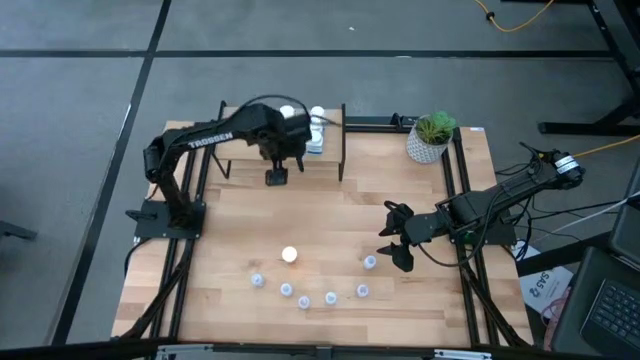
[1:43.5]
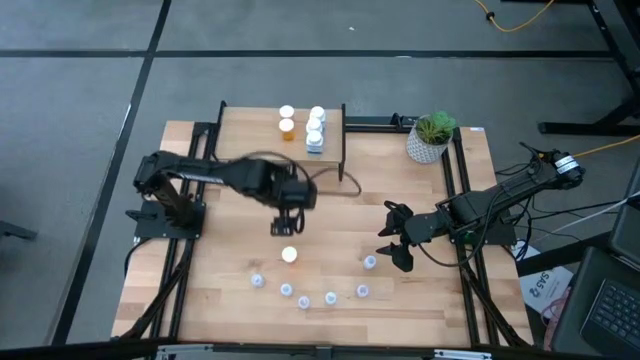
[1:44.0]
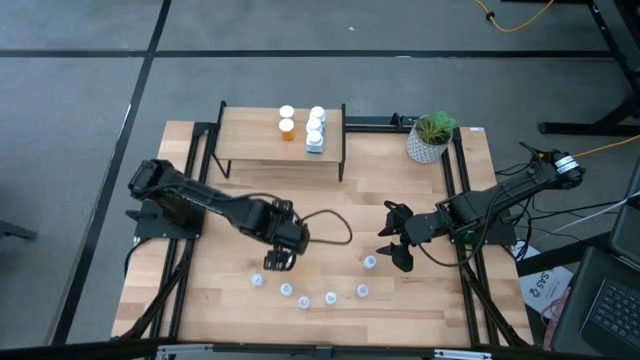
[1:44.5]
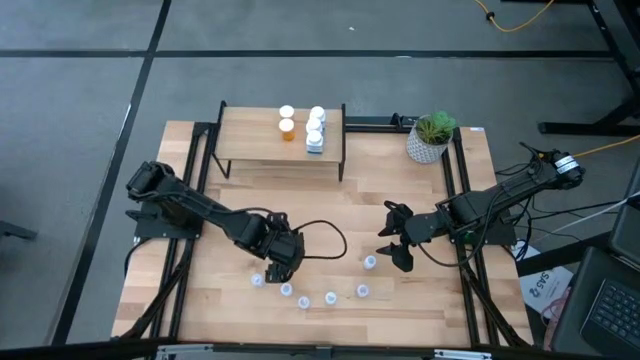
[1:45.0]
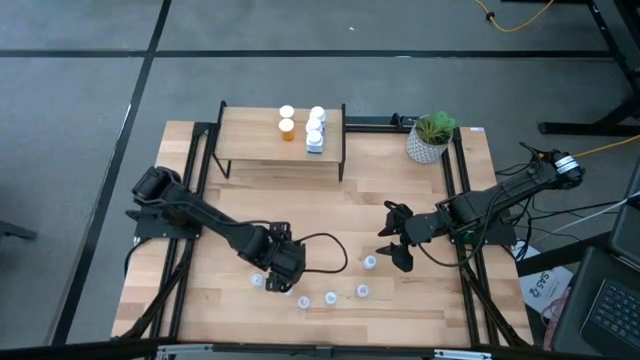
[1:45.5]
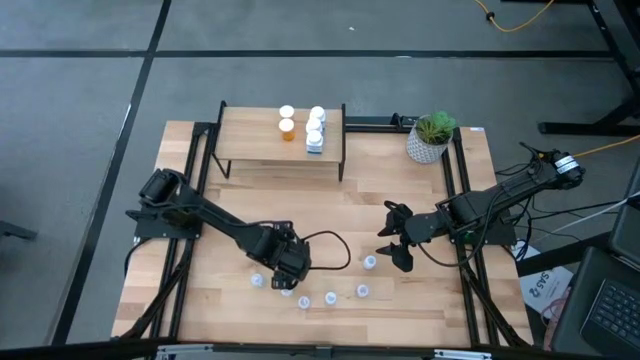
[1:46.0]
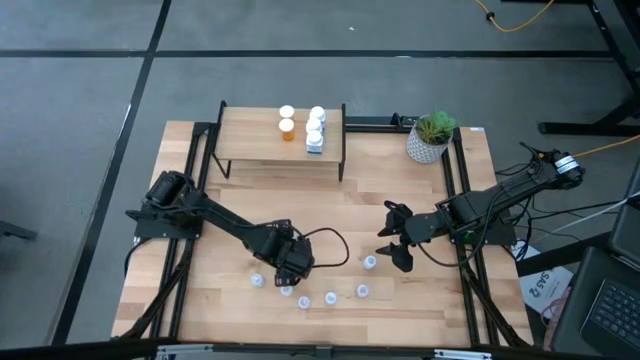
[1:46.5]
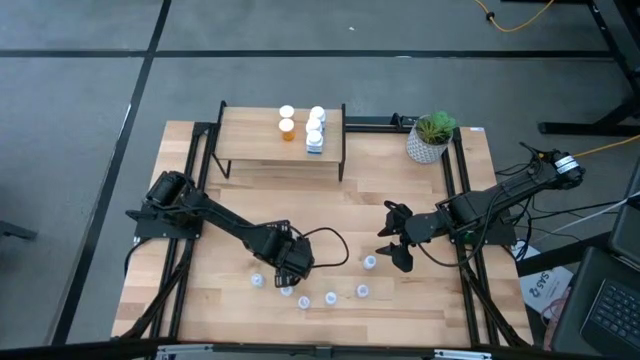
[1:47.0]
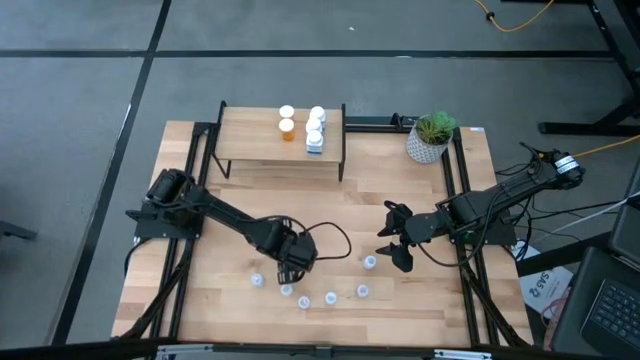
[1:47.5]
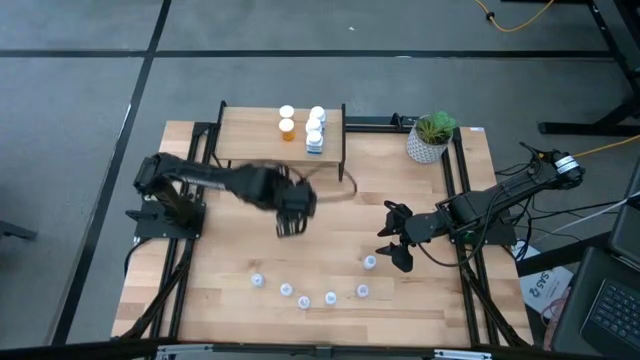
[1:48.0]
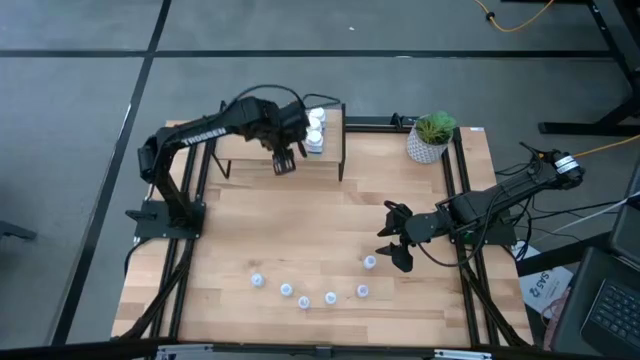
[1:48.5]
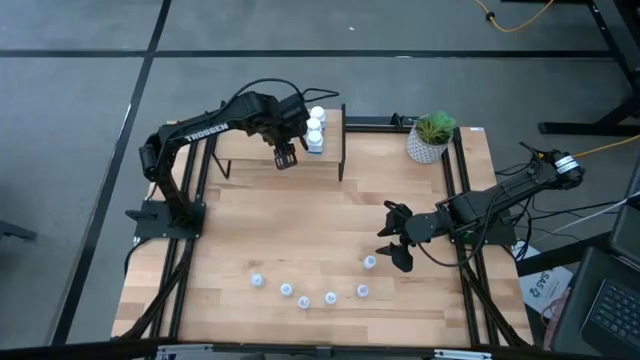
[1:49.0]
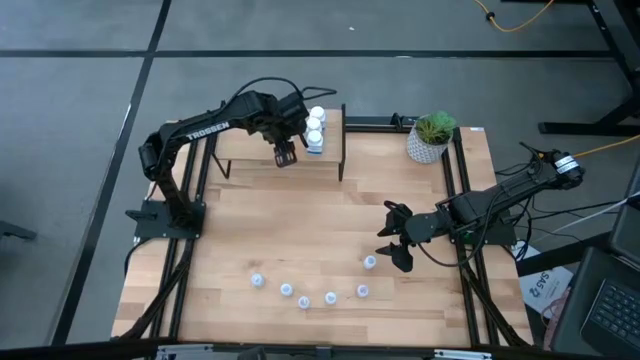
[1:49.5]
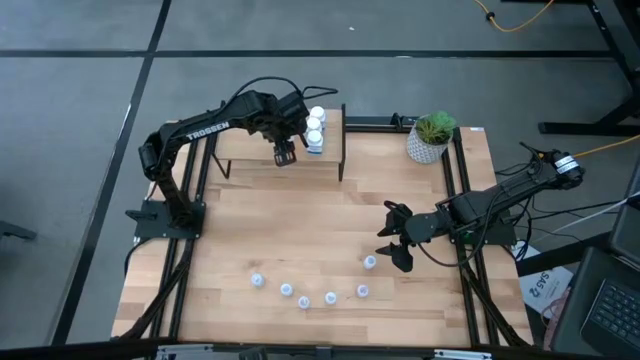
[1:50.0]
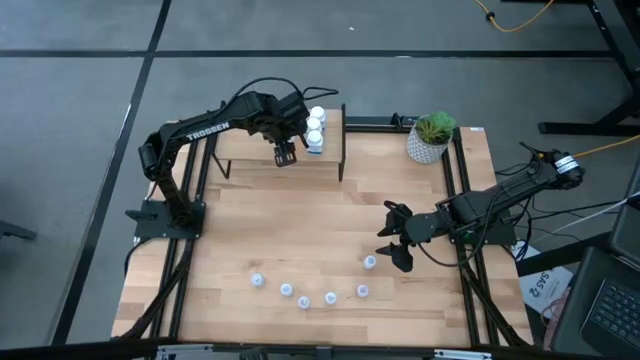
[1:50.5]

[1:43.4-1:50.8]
Task: Pick and place medicine bottles onto shelf by color
Put the orange pill bottle on the shelf aligned with the orange pill bottles

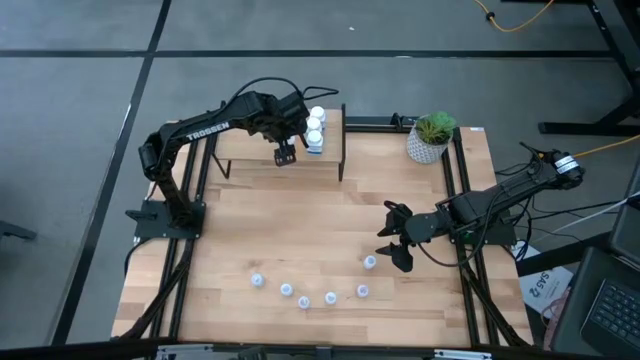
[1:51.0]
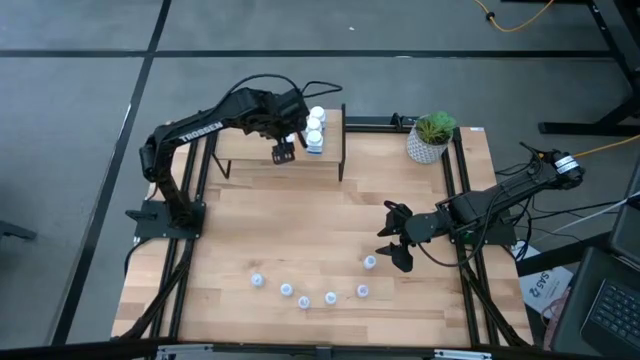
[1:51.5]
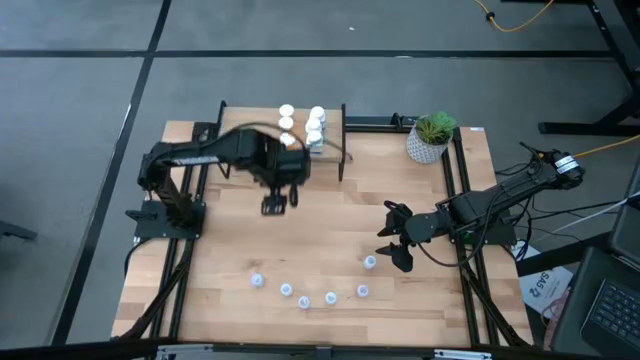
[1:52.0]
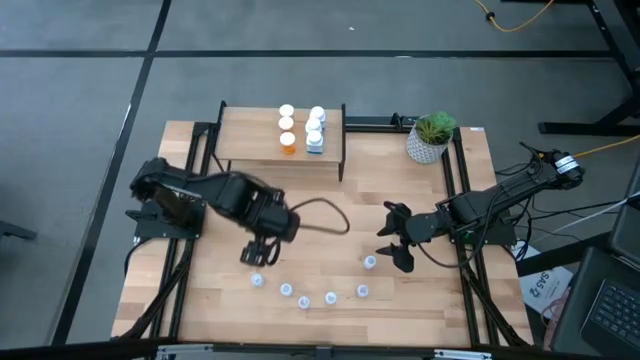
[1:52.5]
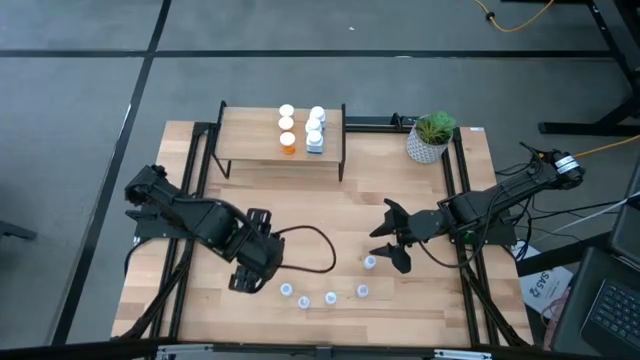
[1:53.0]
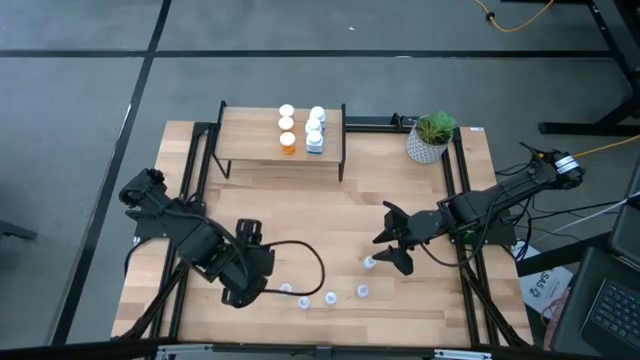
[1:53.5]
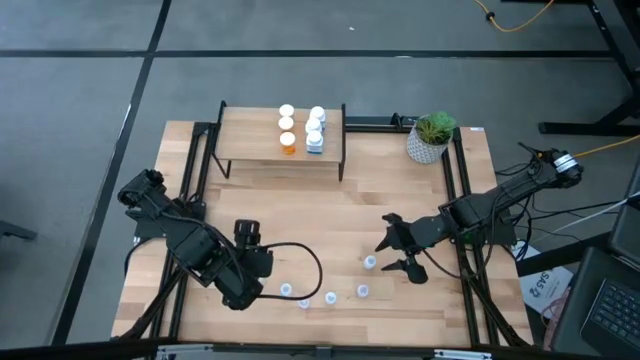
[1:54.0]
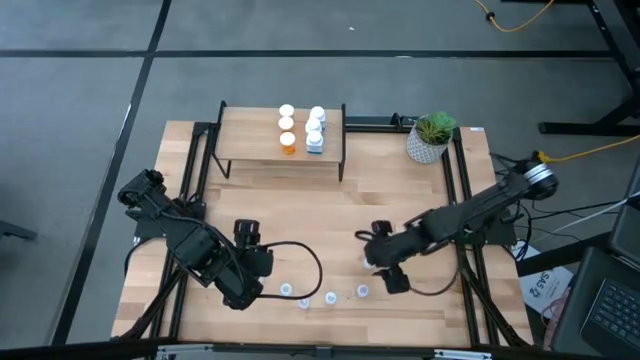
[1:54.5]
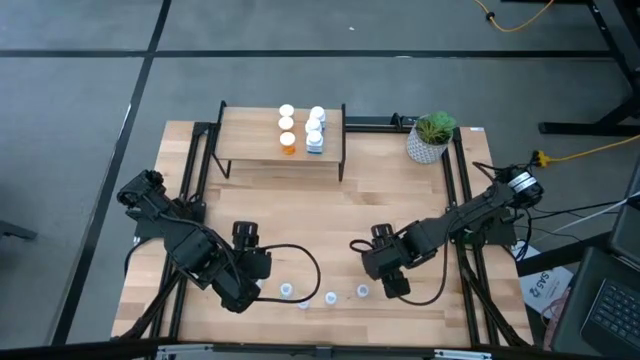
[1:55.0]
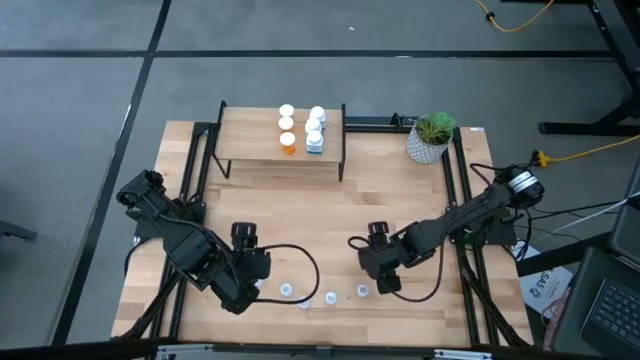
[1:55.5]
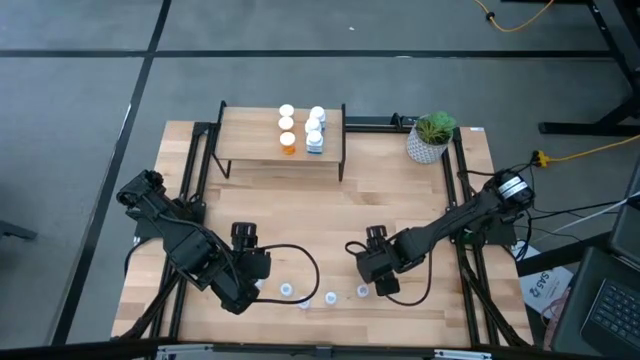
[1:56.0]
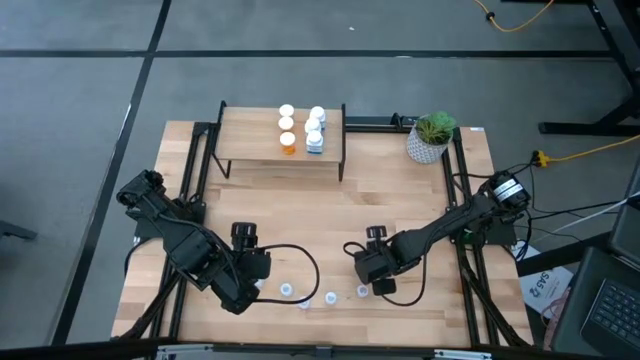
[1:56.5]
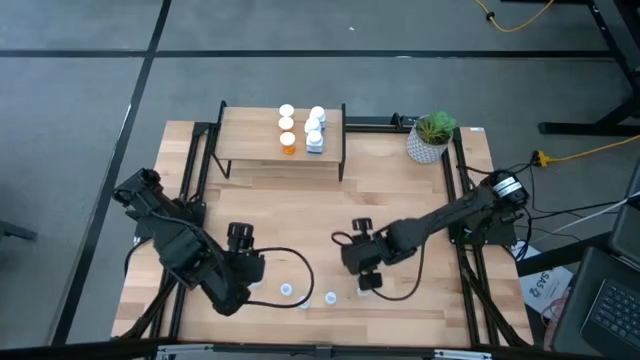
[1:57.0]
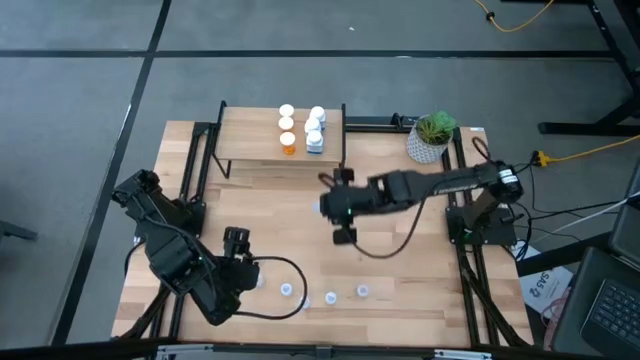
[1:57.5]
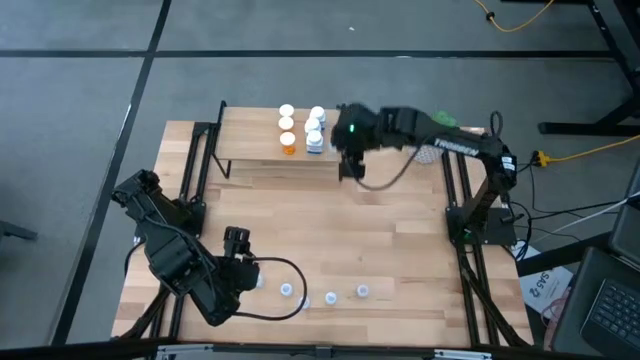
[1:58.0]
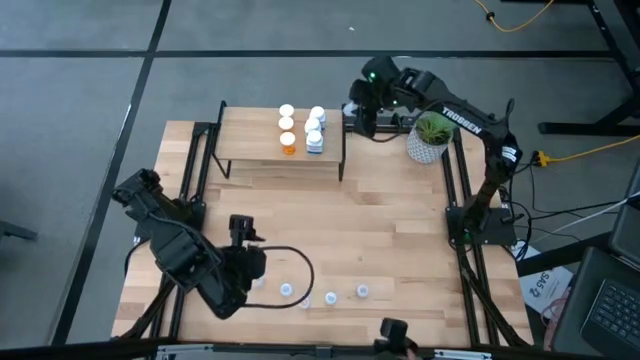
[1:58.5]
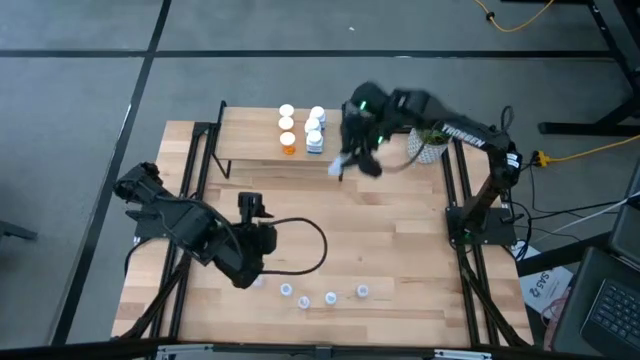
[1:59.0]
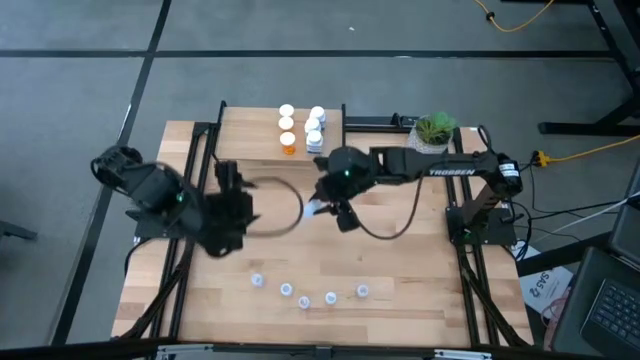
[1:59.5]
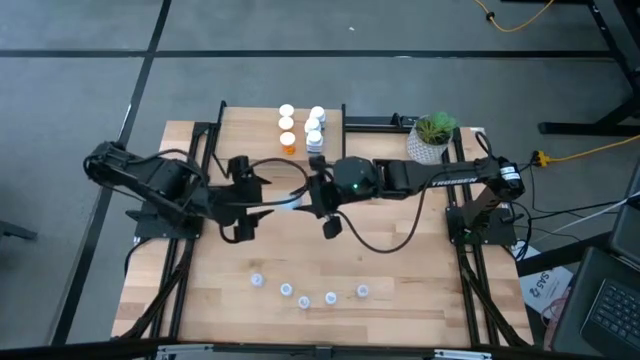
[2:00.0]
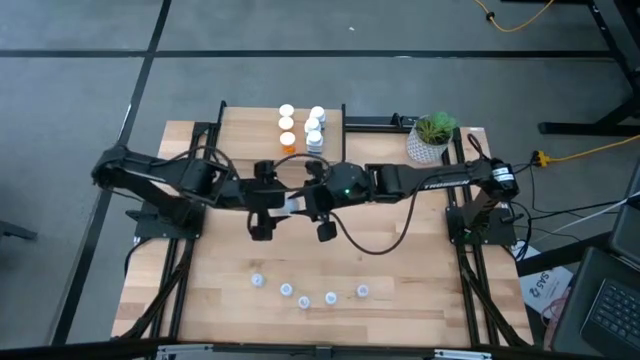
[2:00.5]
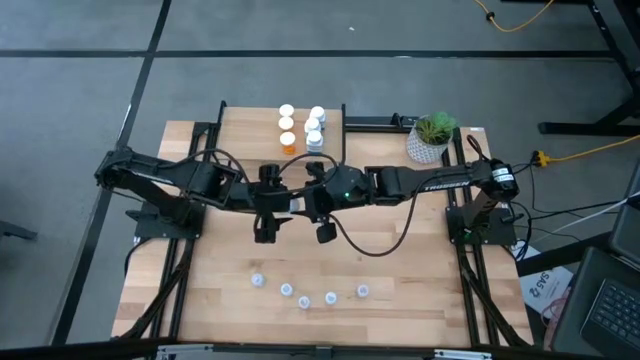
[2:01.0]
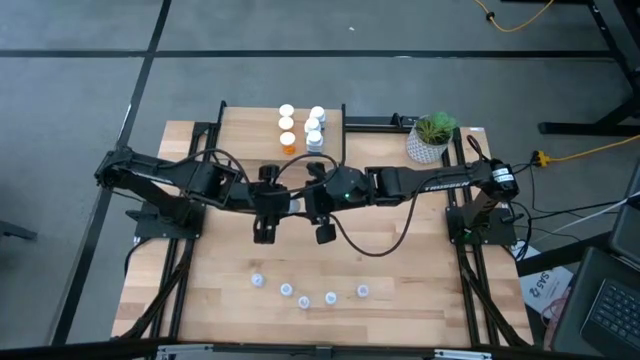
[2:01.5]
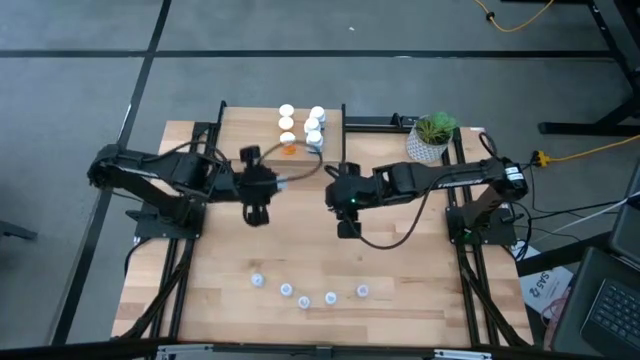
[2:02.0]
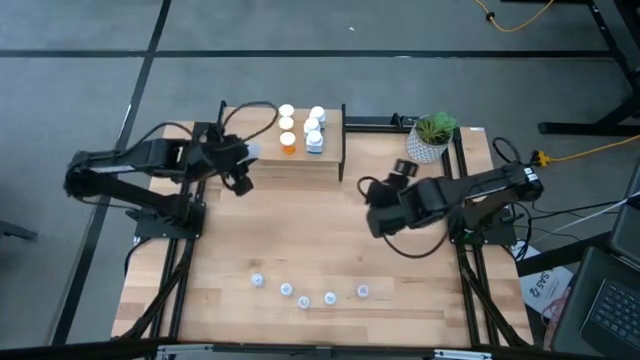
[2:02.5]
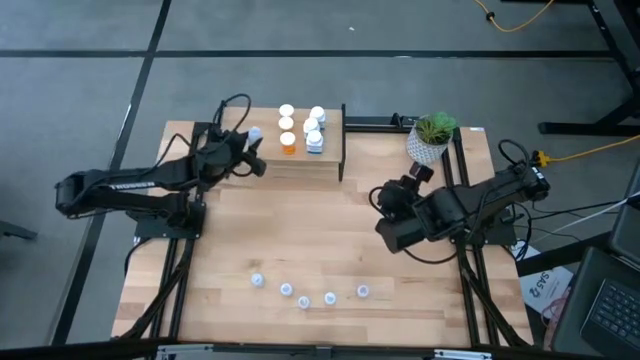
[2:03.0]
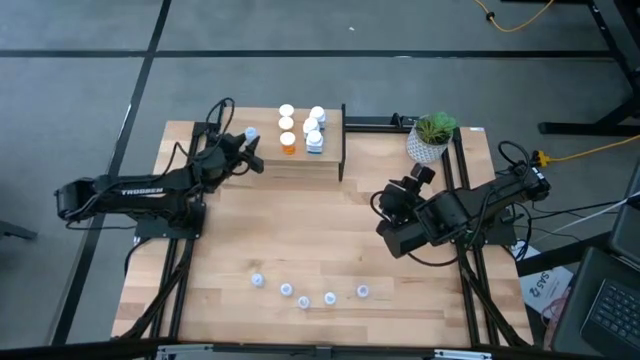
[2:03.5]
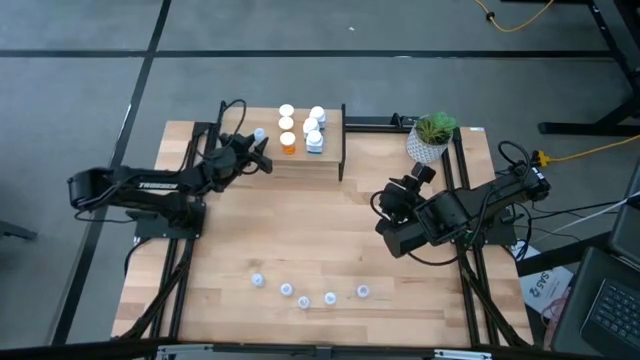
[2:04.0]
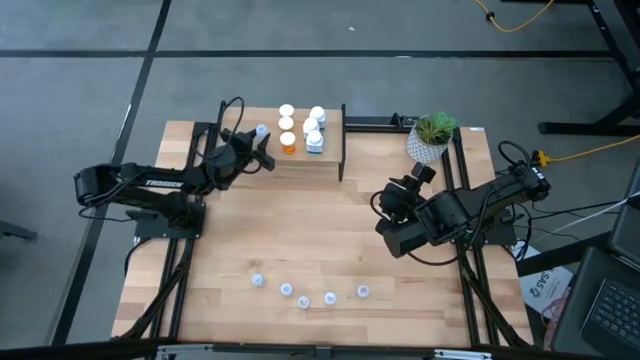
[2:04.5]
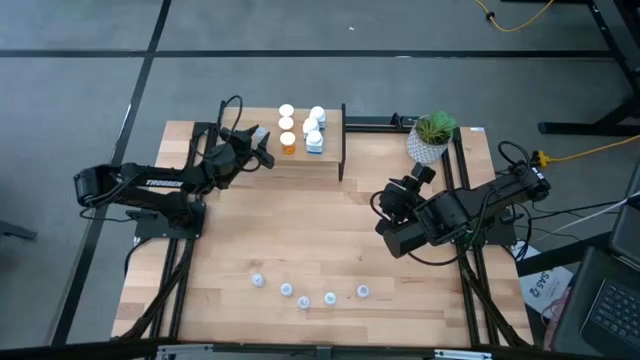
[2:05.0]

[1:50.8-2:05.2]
Put the transparent pill bottle on the shelf
